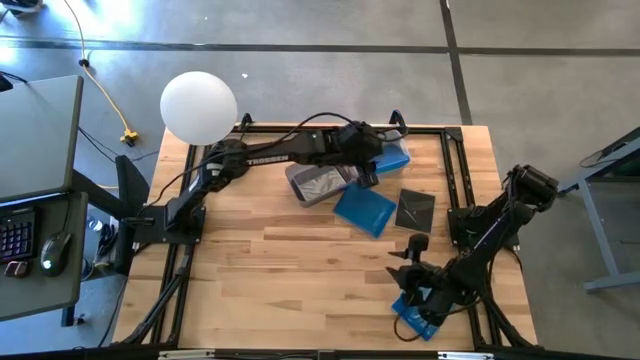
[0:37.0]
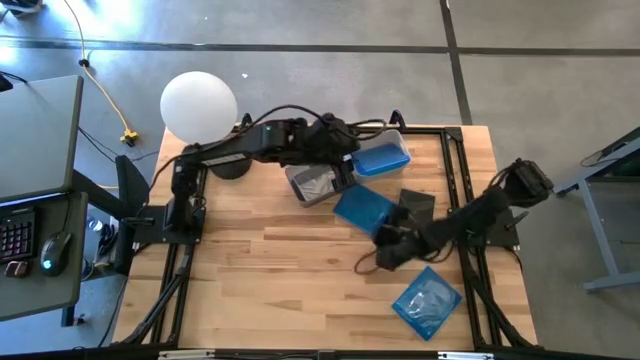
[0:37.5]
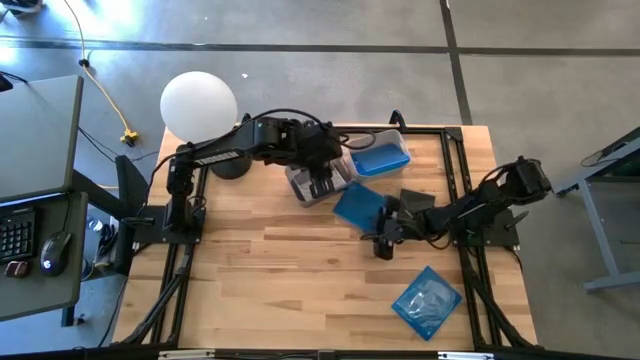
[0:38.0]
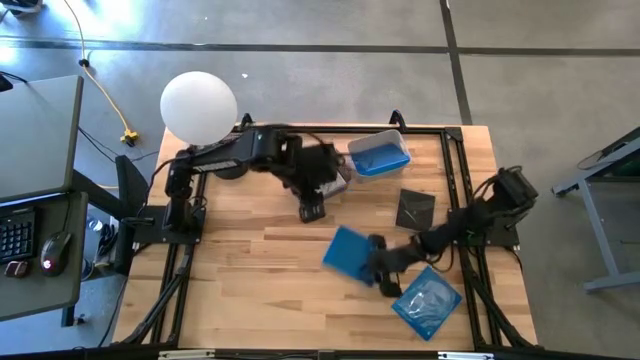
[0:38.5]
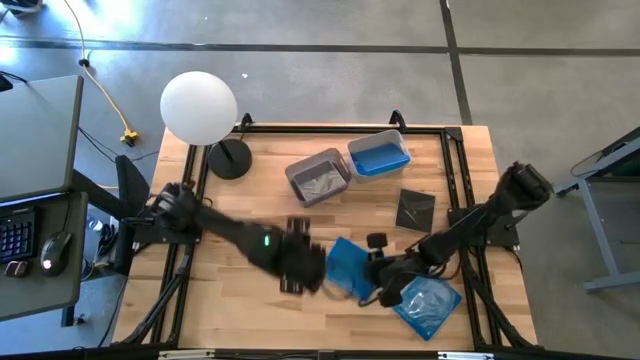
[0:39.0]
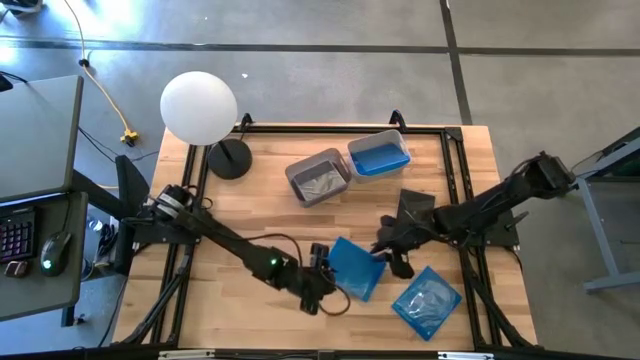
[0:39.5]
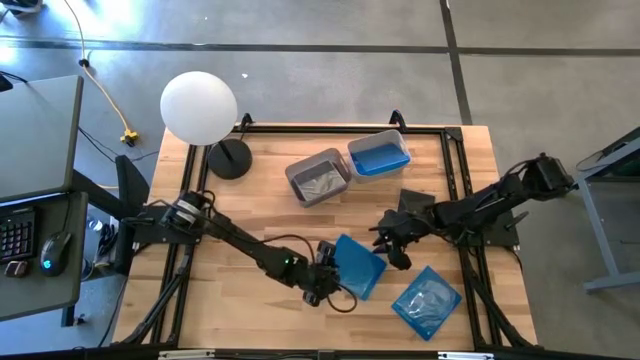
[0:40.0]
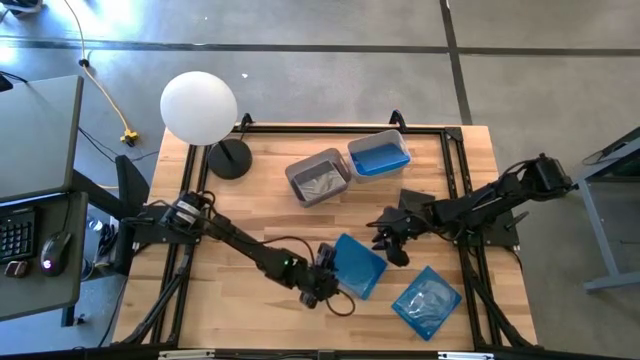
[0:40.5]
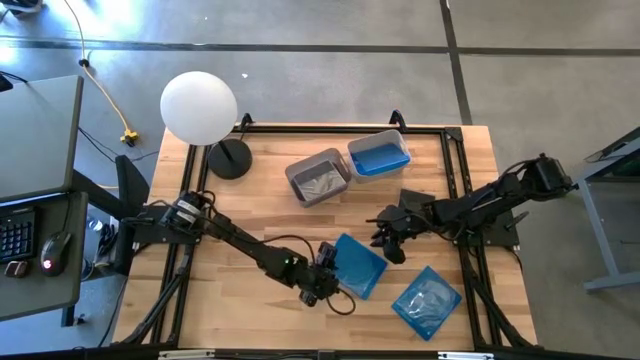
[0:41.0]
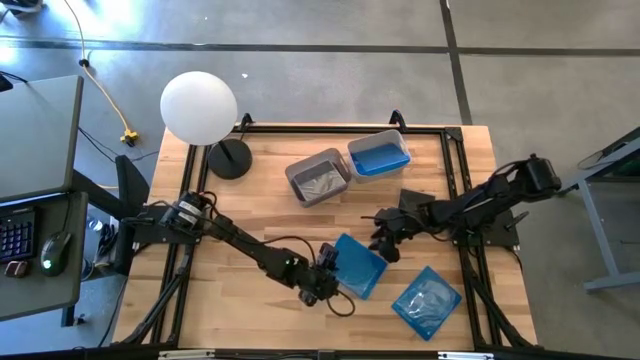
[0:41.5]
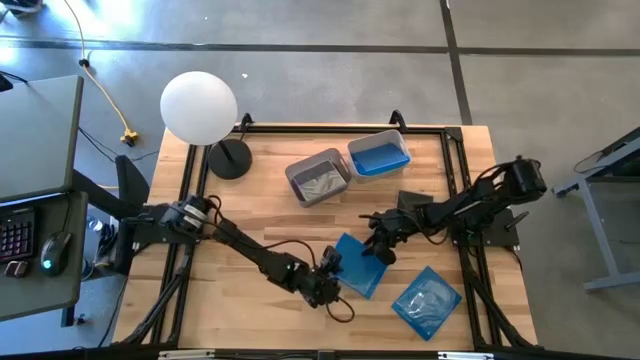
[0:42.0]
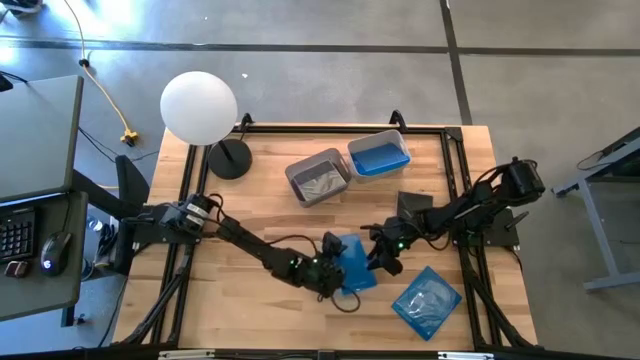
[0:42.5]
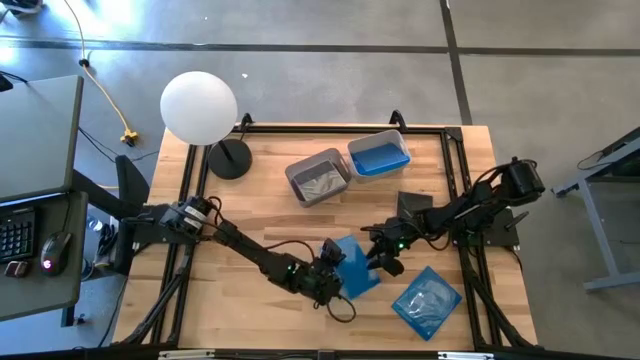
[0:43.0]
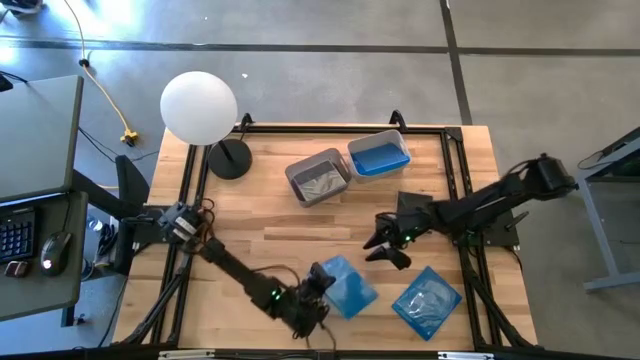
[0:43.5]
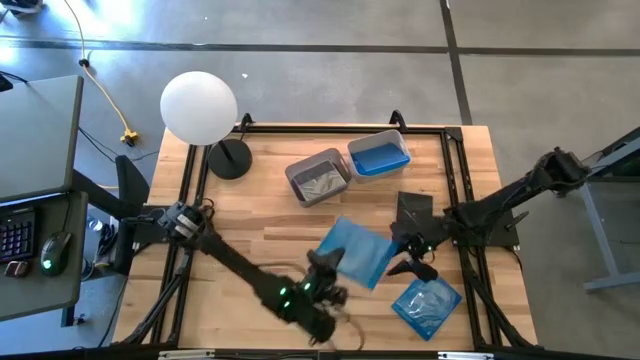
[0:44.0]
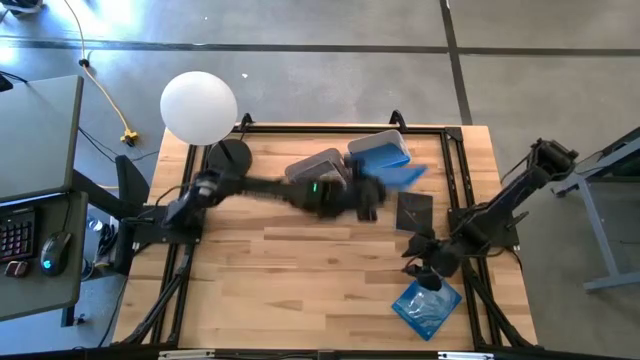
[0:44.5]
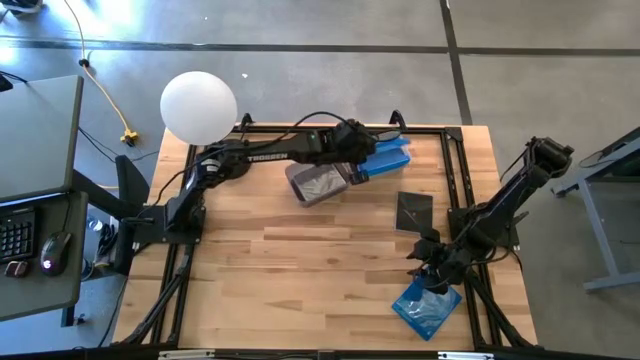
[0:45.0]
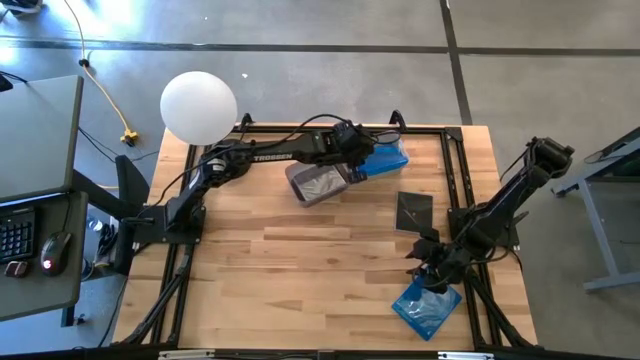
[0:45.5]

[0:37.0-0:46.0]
Task: Pick & place jewel cases by type
Put the top blue CD case into the white bin

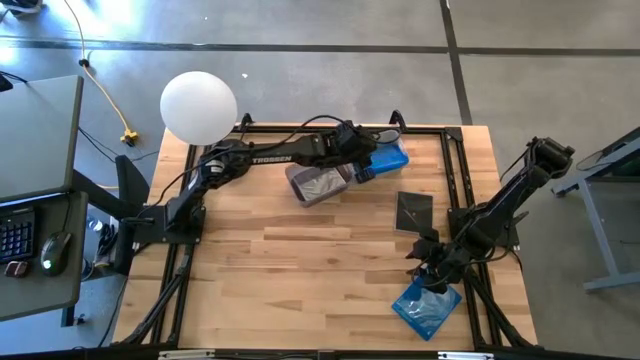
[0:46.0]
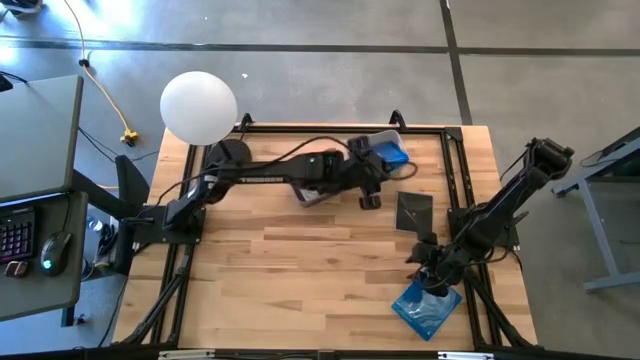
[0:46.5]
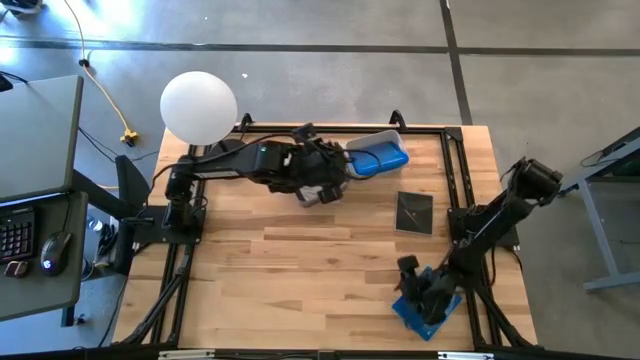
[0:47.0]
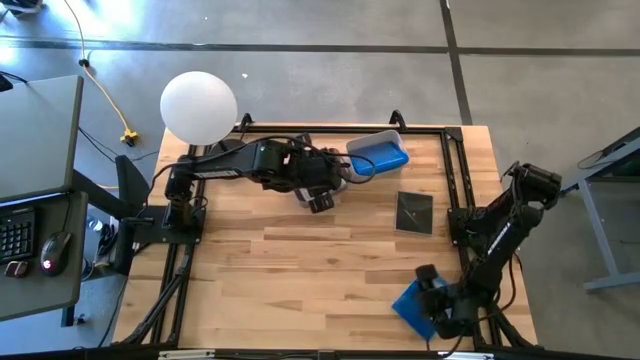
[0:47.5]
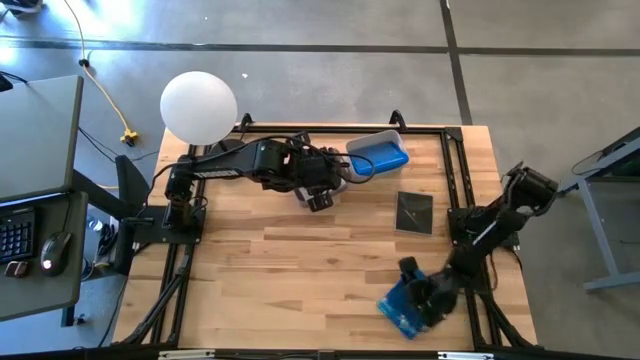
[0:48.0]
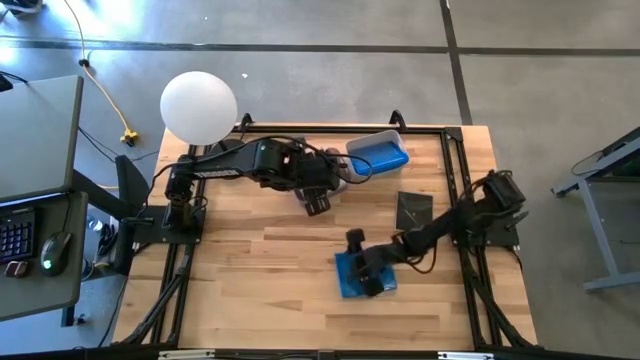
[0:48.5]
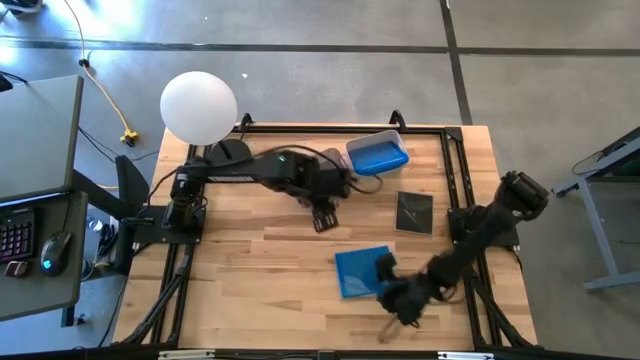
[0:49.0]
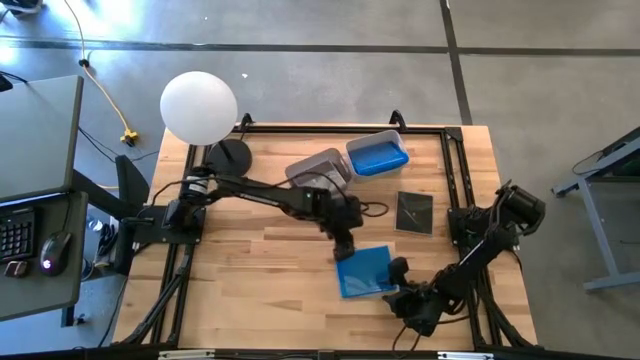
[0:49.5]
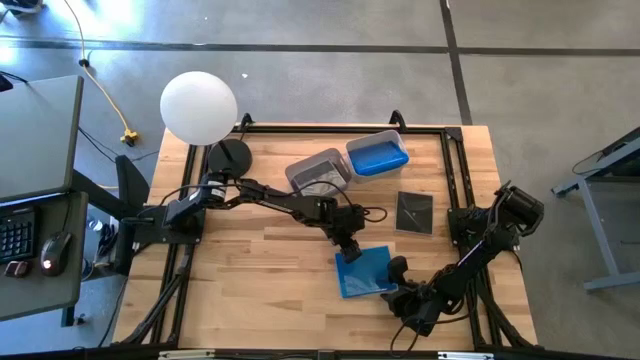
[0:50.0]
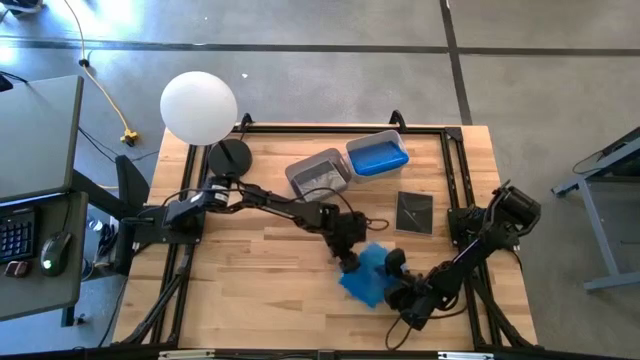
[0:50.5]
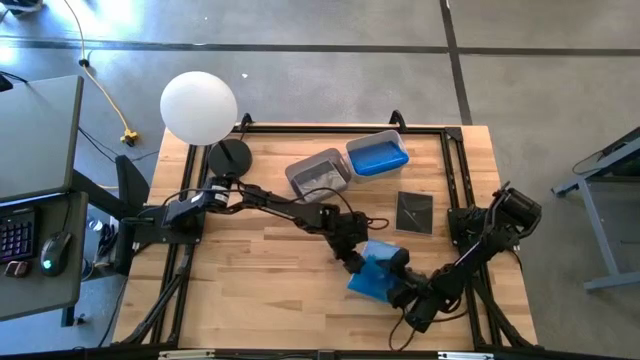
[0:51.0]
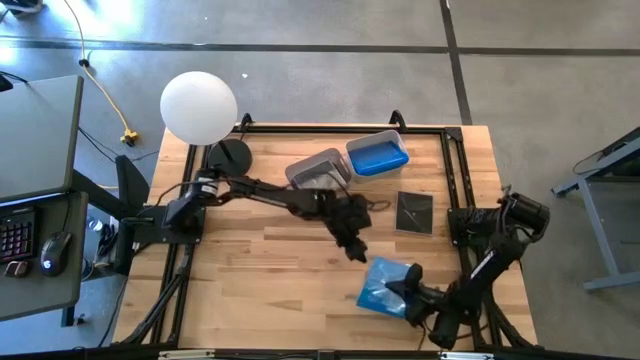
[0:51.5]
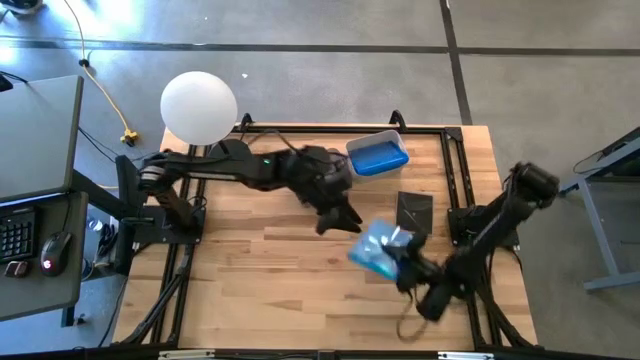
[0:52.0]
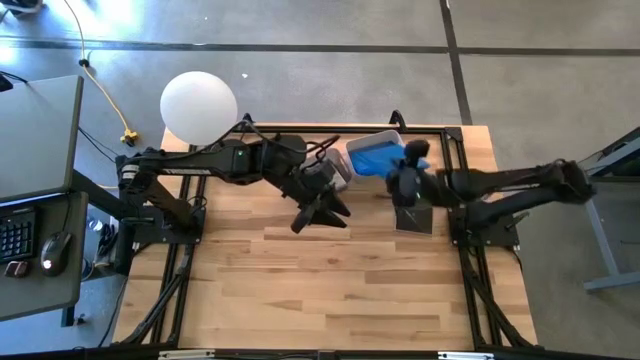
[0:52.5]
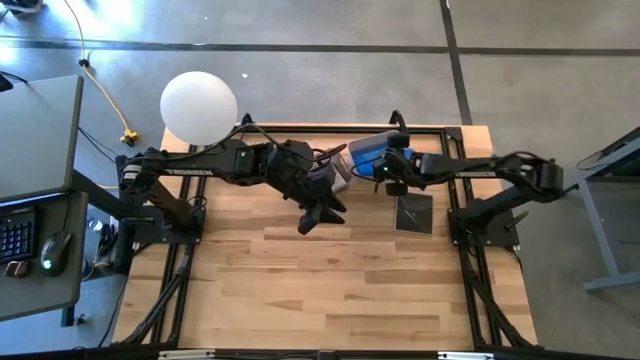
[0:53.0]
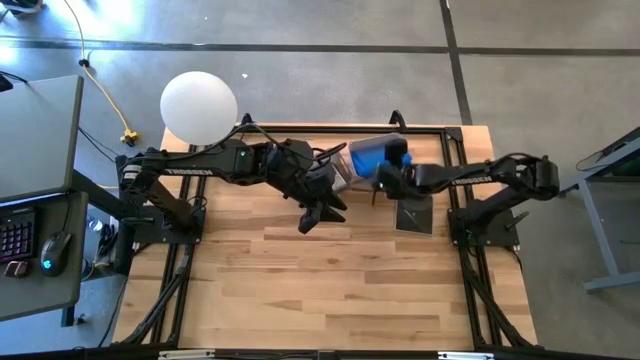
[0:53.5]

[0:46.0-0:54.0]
Put the blue CD case into the white bin

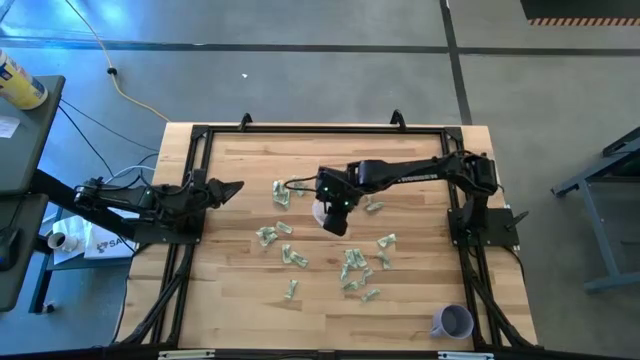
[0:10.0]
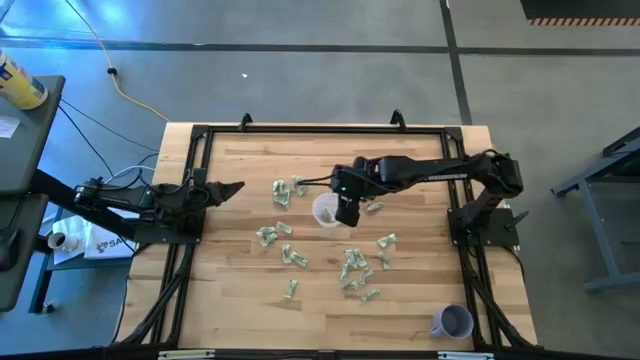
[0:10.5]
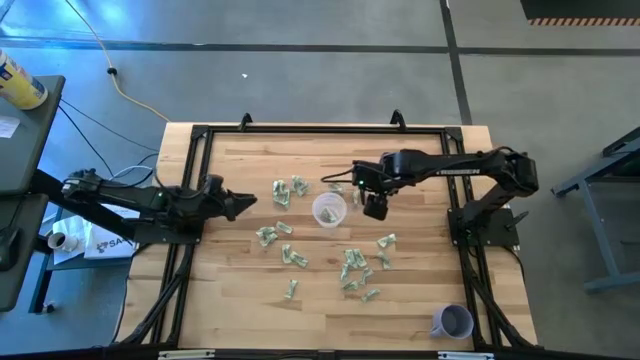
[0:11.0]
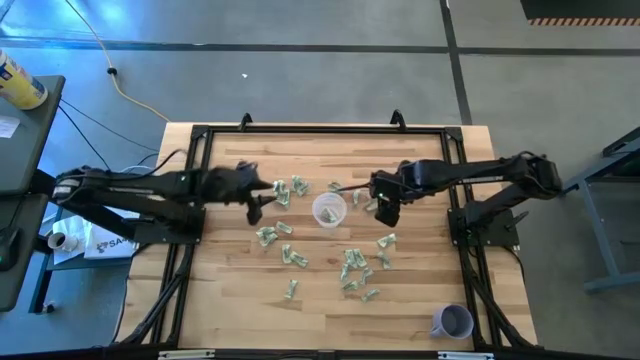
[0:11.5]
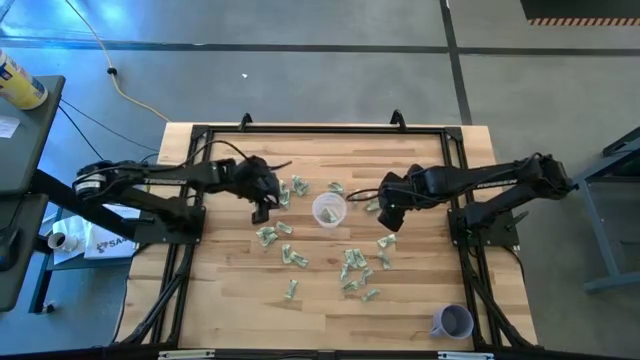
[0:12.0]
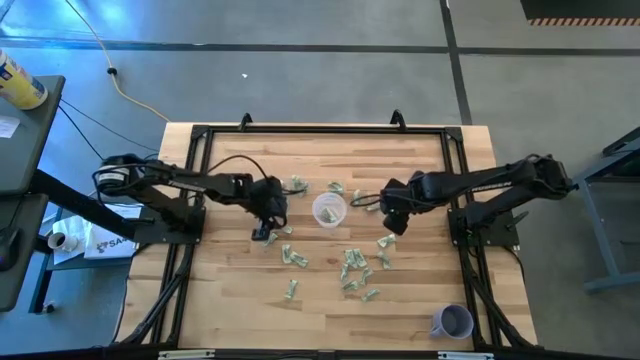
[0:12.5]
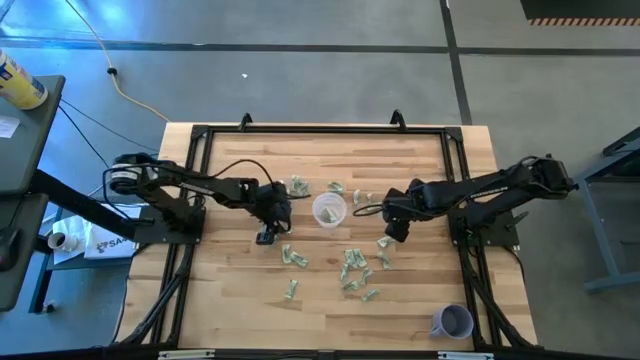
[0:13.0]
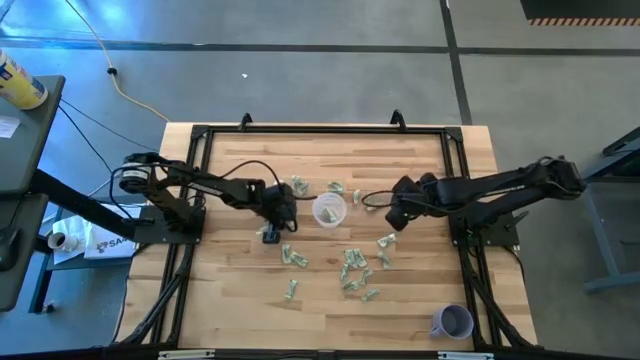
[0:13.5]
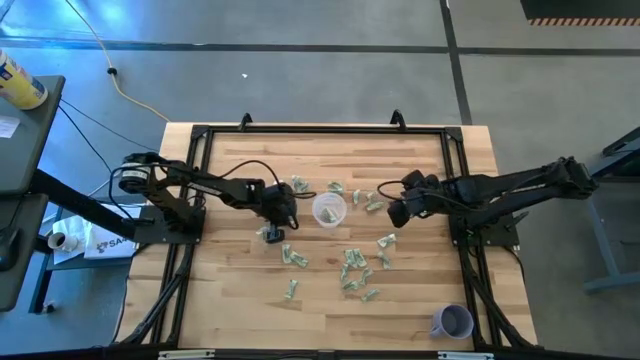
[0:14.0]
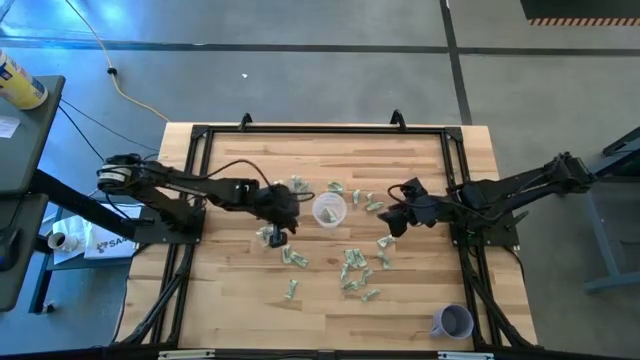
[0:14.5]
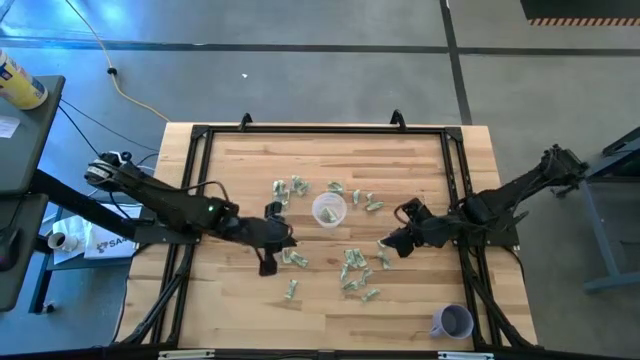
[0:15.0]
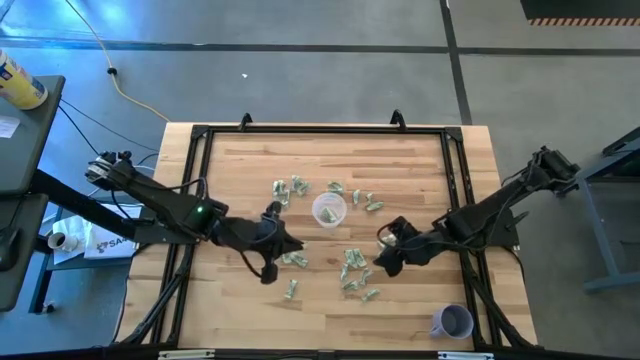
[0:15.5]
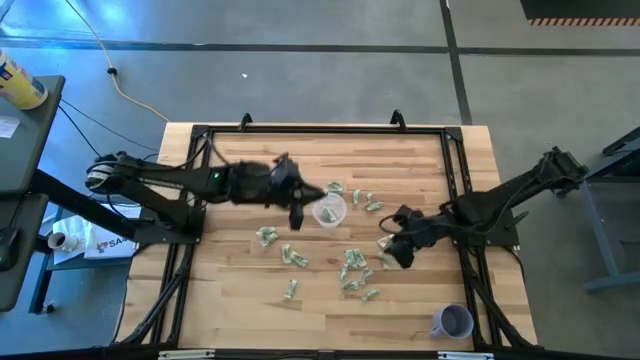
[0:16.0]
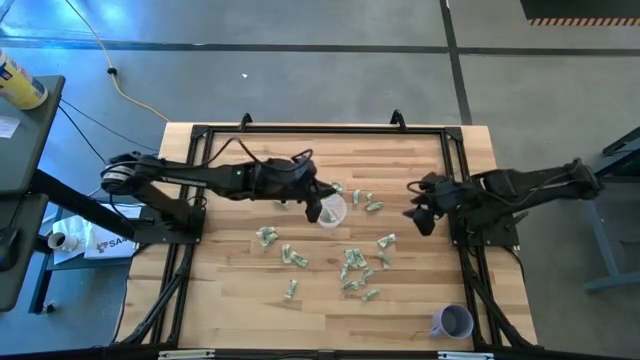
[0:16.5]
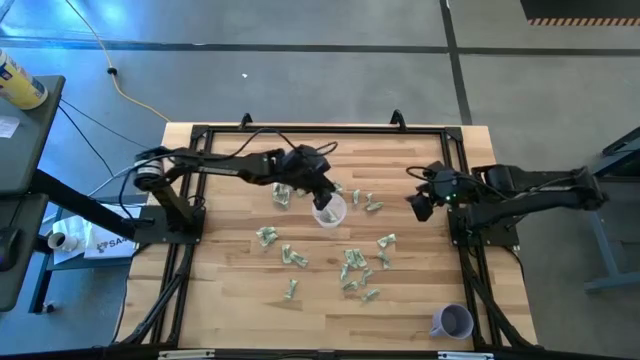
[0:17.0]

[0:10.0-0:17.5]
Task: Pick and place Stevia / Truvia into bins
Put the white stevia packet into the transparent container
